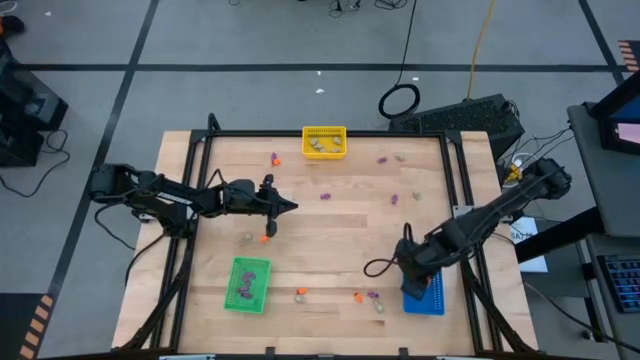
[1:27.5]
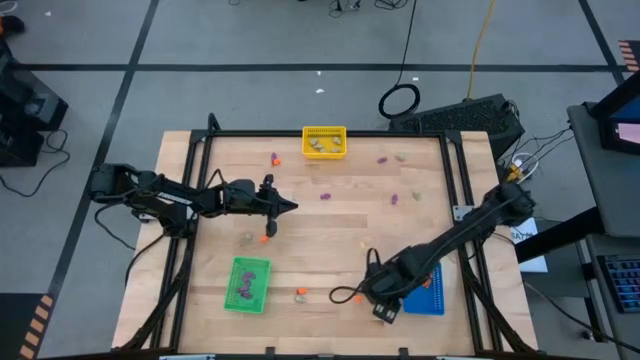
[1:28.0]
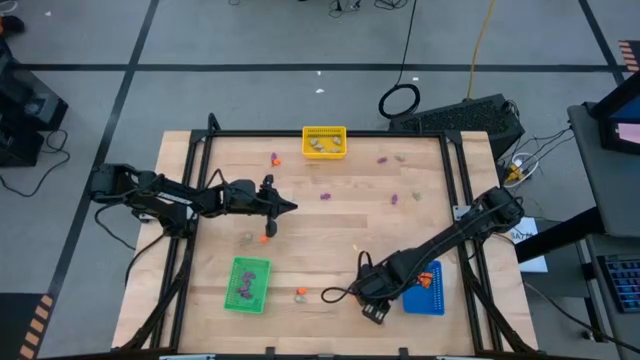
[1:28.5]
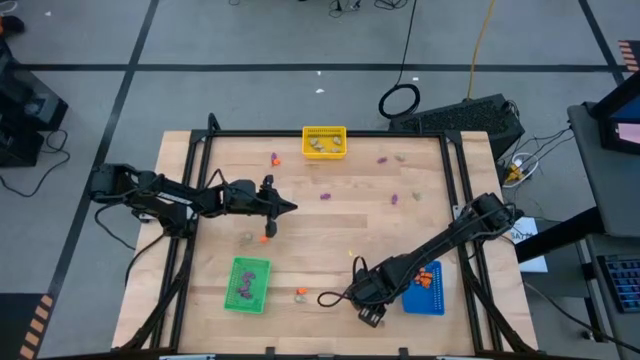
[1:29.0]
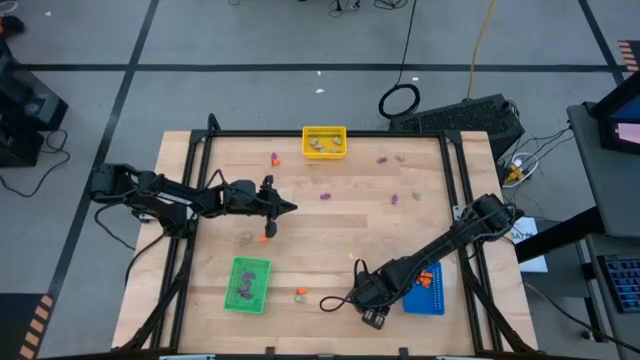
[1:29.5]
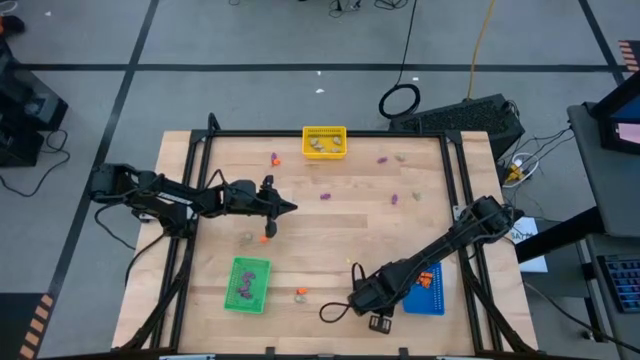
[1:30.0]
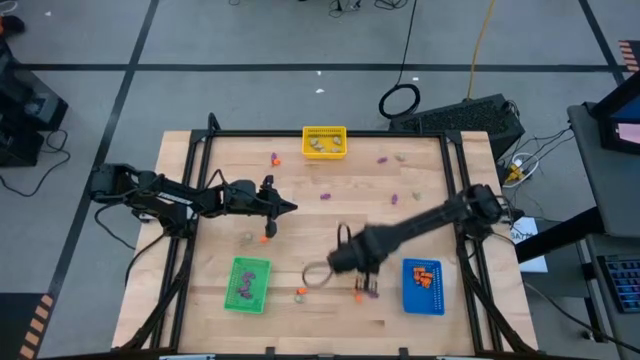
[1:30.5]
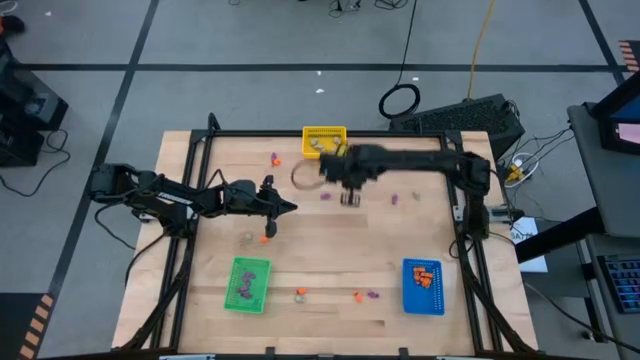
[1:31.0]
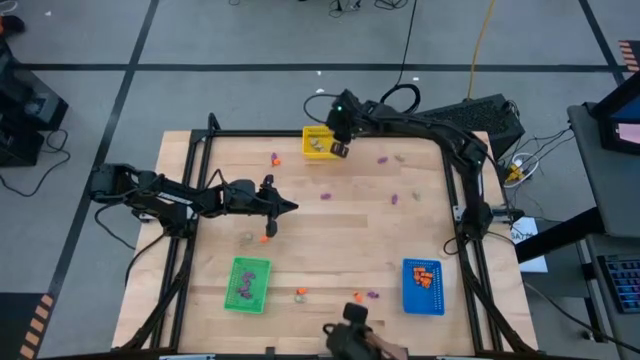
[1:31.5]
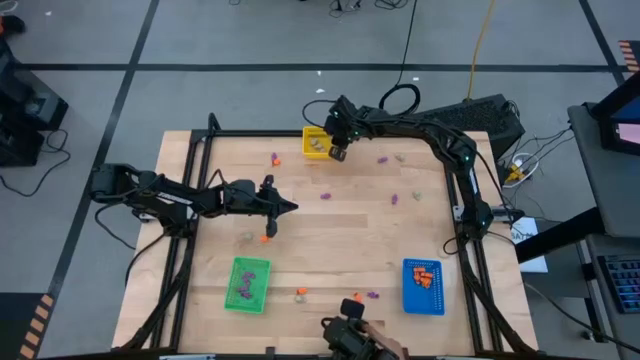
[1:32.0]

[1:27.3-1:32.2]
Task: Sort Halloween decoration
Put the gray skull toy into the yellow bin

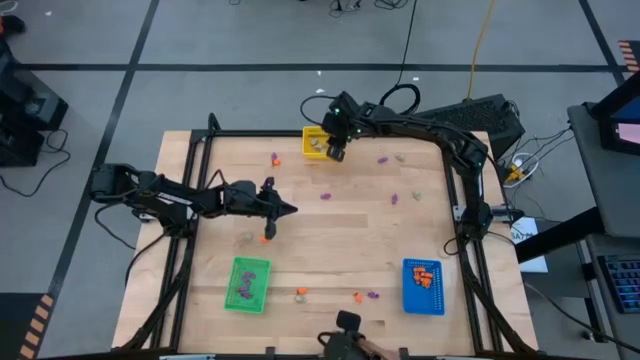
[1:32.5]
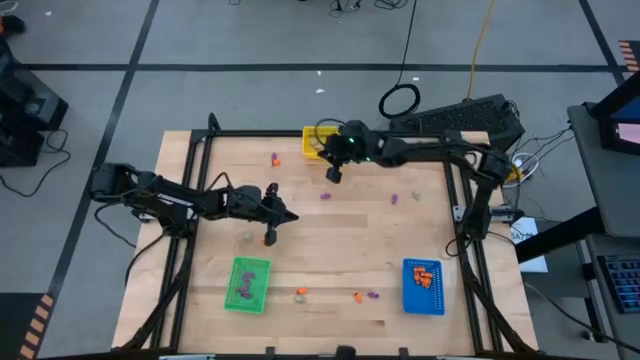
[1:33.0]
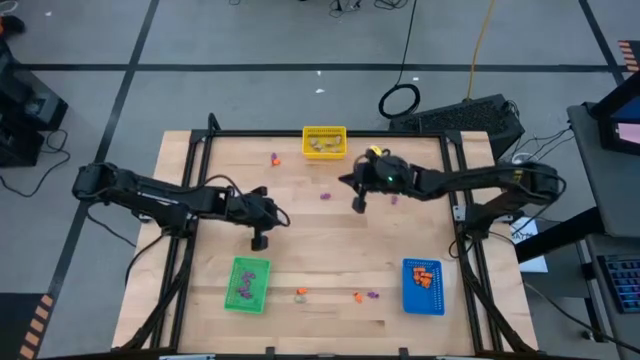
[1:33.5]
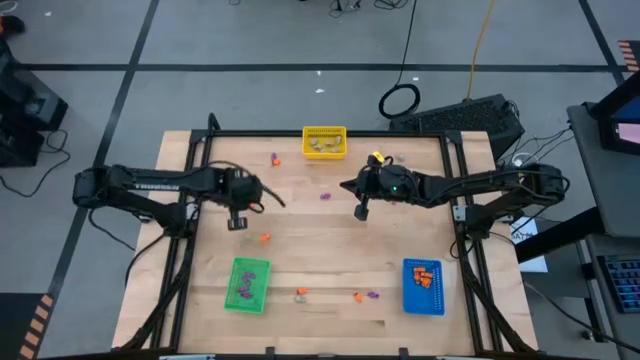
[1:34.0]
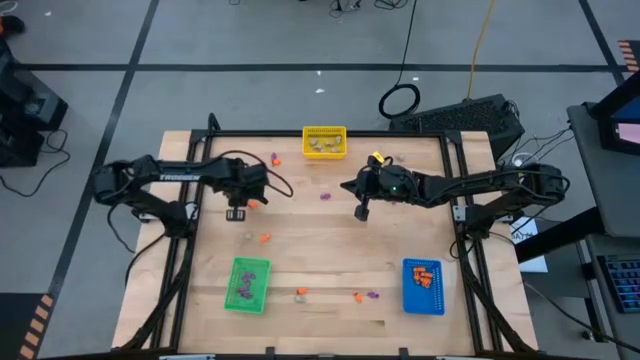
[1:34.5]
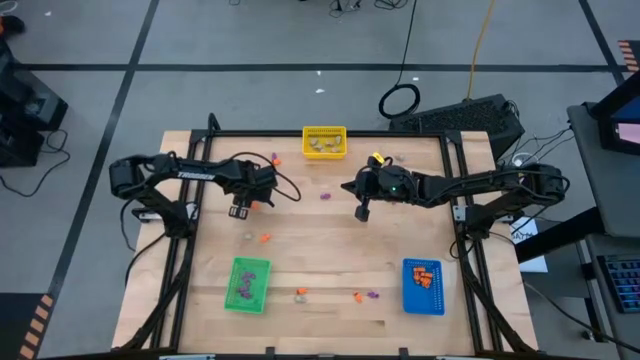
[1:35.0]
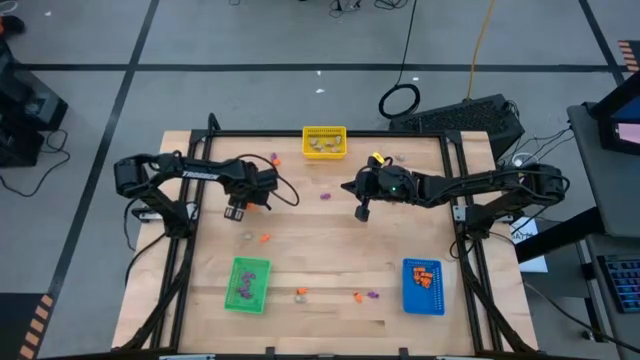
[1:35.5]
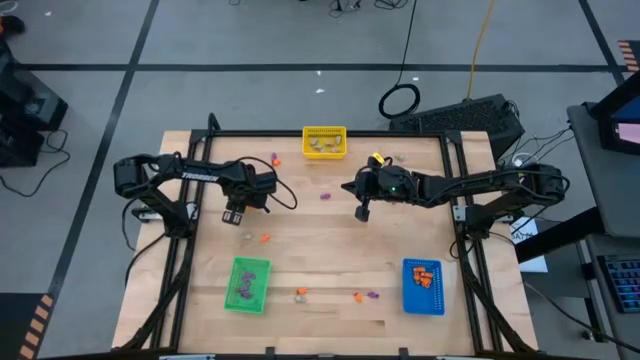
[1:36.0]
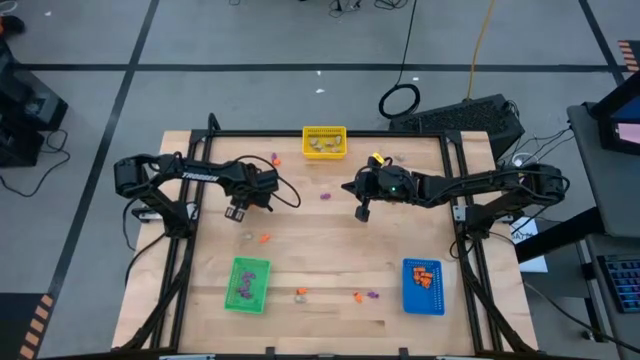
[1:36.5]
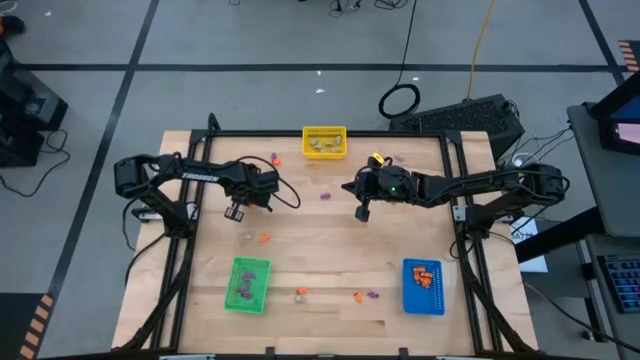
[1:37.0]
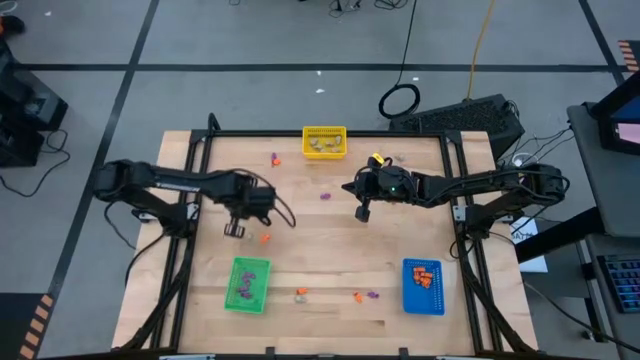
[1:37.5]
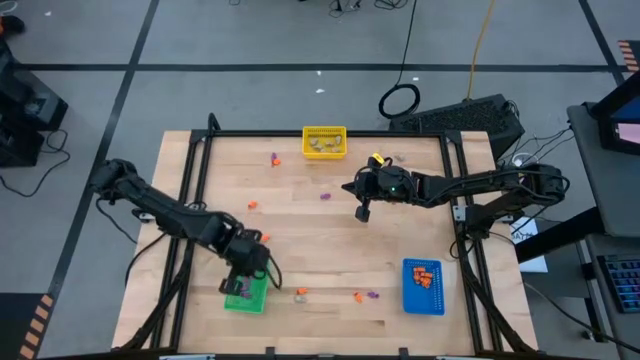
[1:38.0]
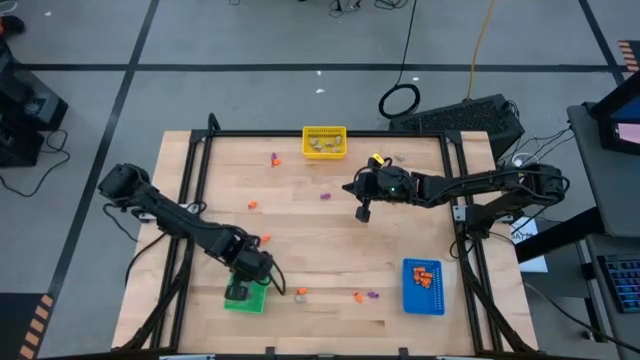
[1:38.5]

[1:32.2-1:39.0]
Put the purple skeleton toy into the green bin

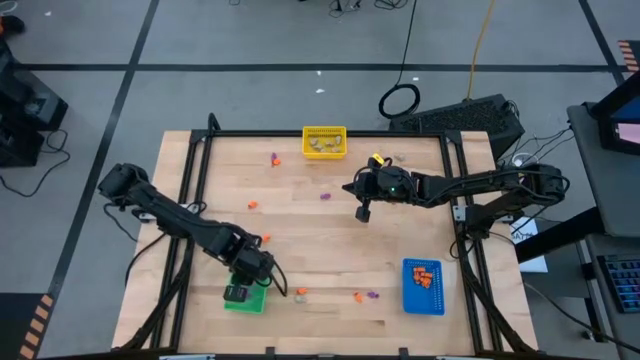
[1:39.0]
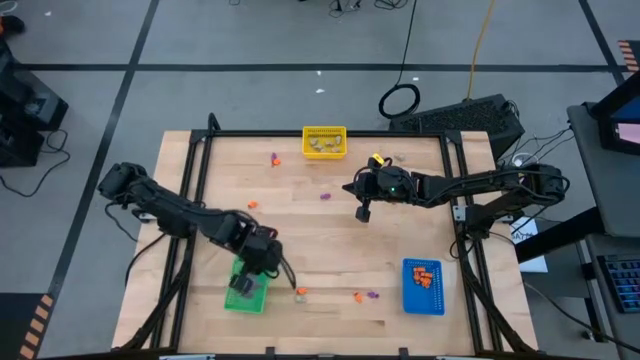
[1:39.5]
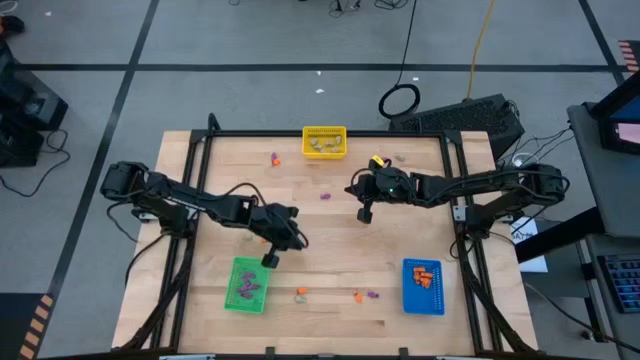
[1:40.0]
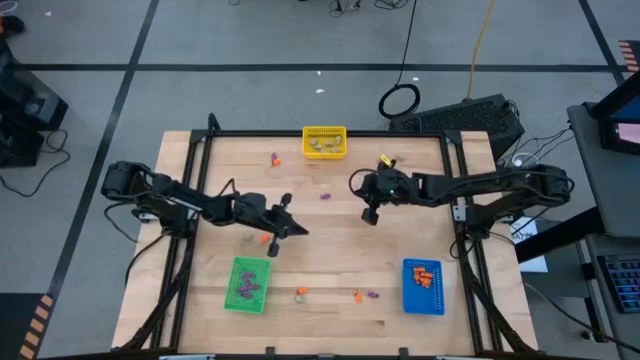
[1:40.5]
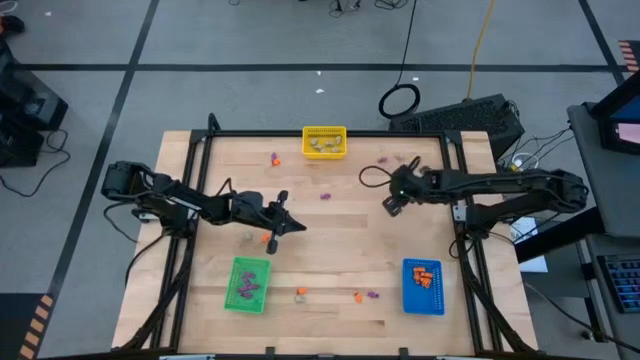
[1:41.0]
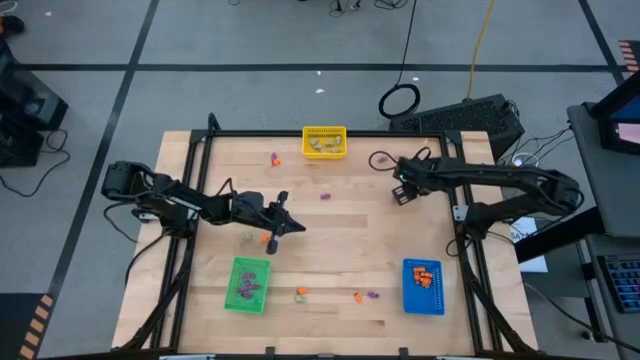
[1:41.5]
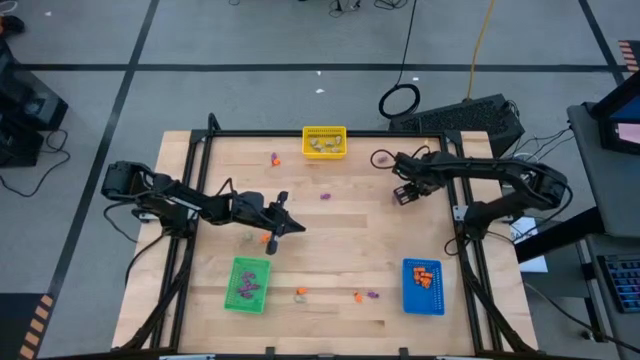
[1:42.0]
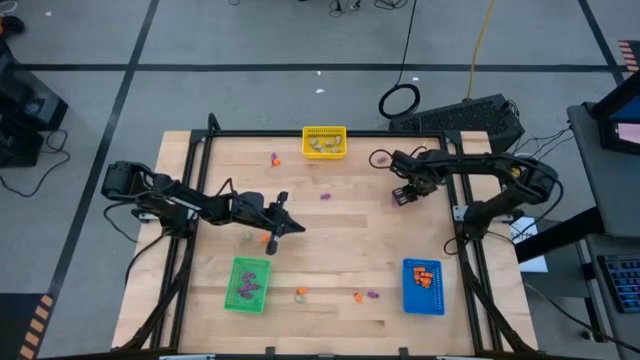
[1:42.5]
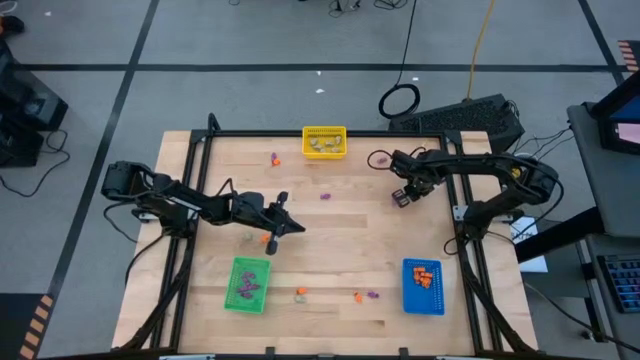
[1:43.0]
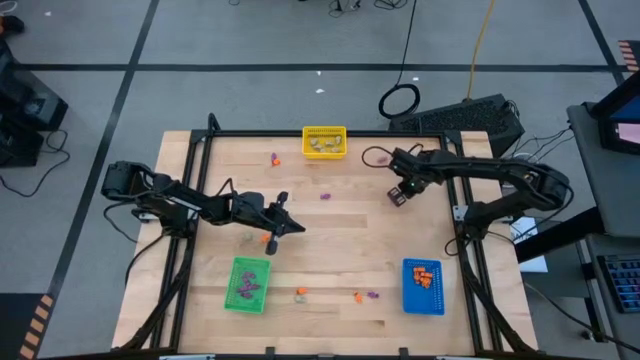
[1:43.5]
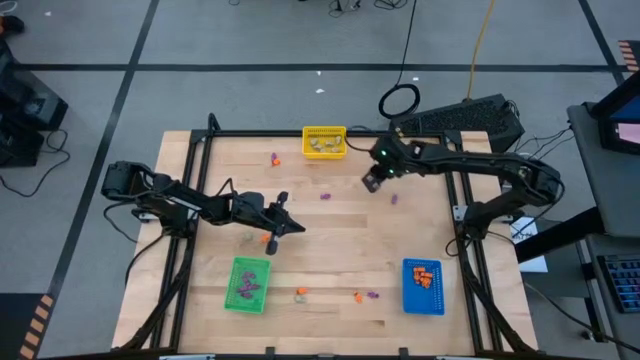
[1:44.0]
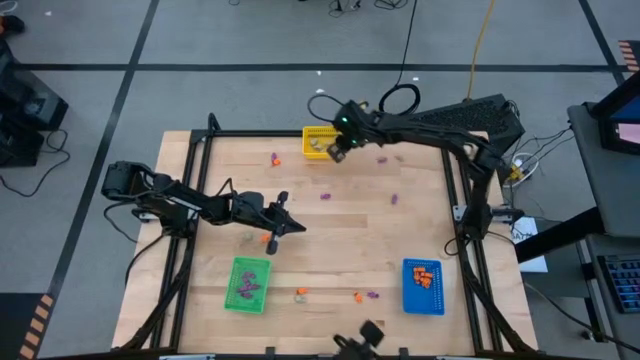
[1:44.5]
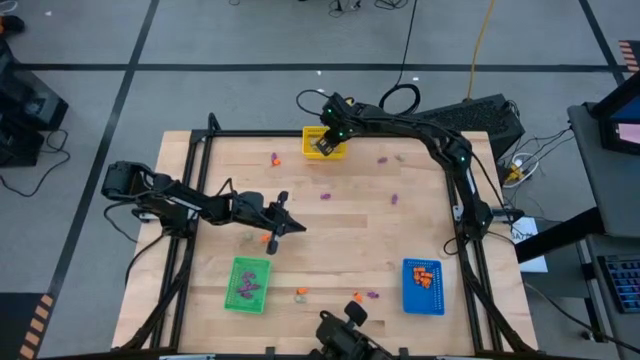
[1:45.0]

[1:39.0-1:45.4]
Put the gray skull toy into the yellow bin

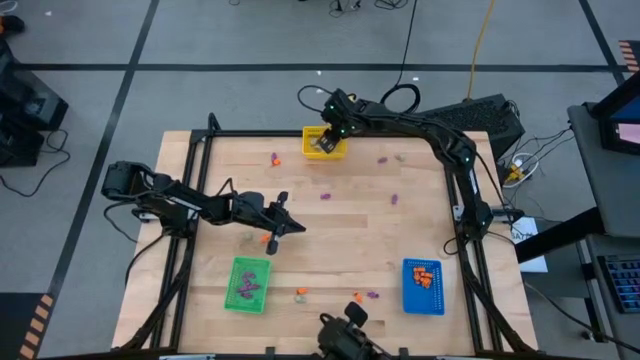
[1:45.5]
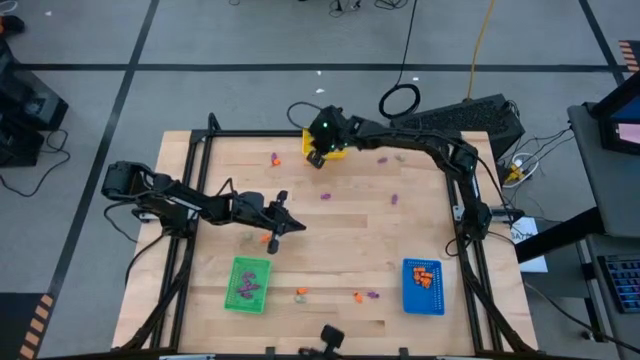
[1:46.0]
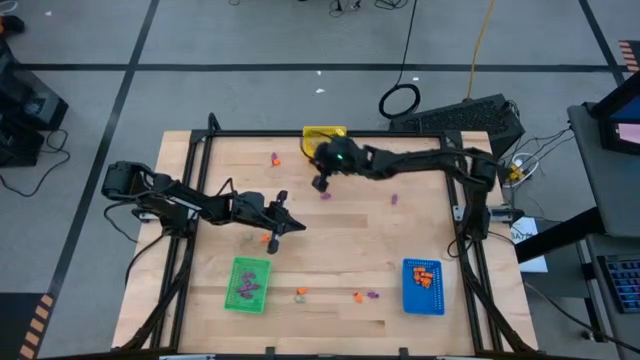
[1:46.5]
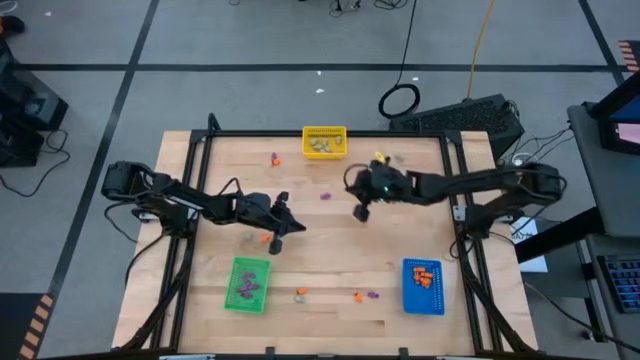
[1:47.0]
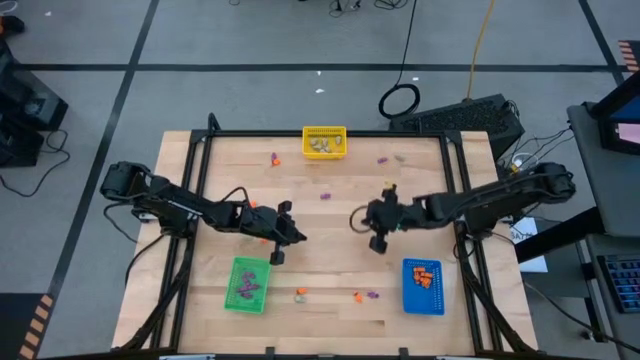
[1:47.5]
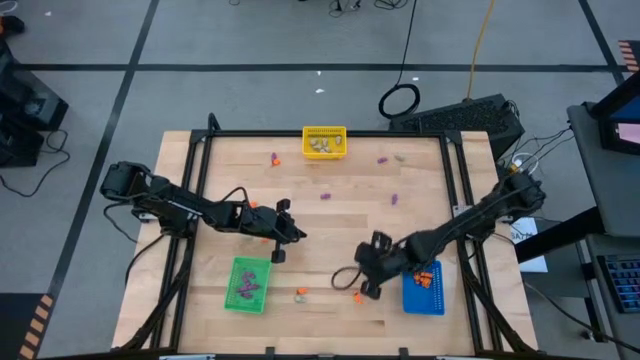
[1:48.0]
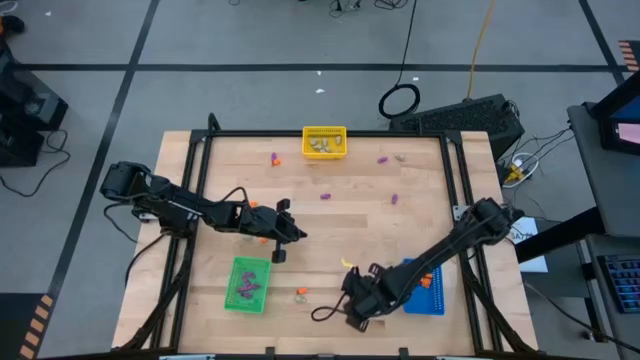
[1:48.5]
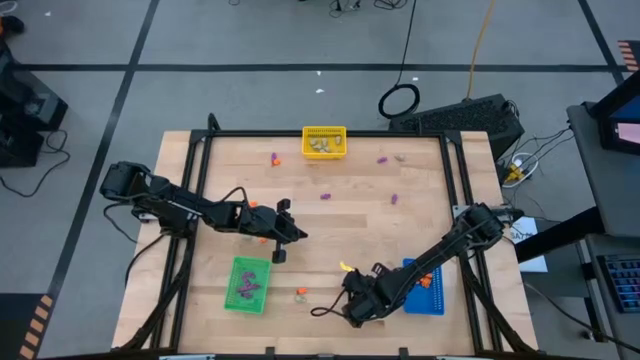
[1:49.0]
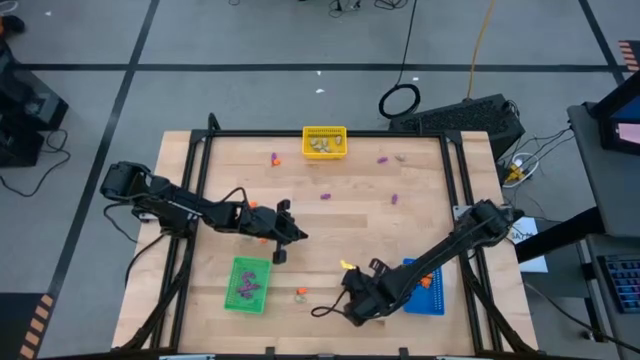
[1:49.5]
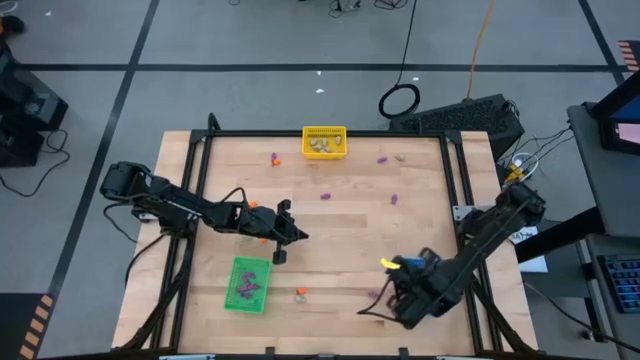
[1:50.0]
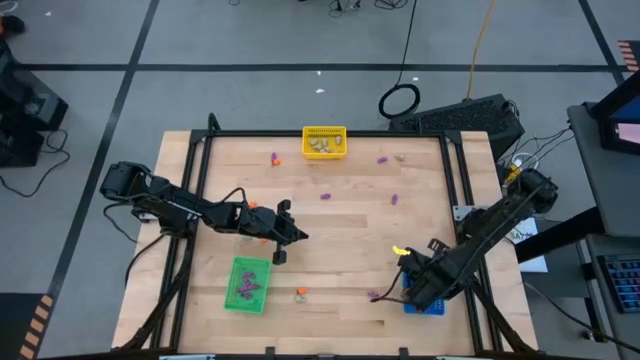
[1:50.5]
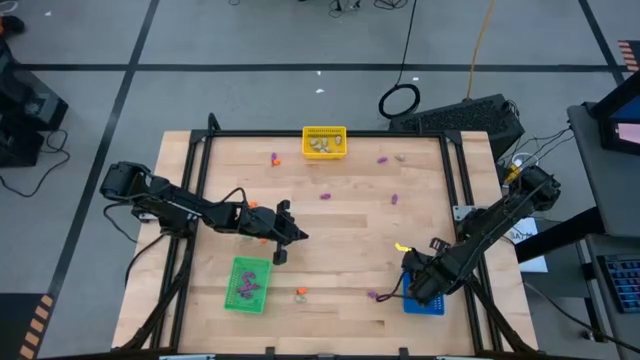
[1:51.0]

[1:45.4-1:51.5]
Put the orange skeleton toy into the blue bin
